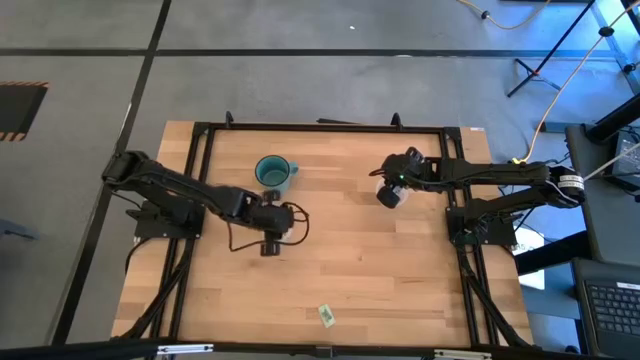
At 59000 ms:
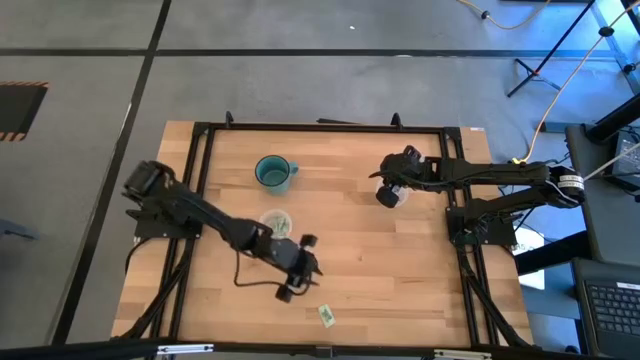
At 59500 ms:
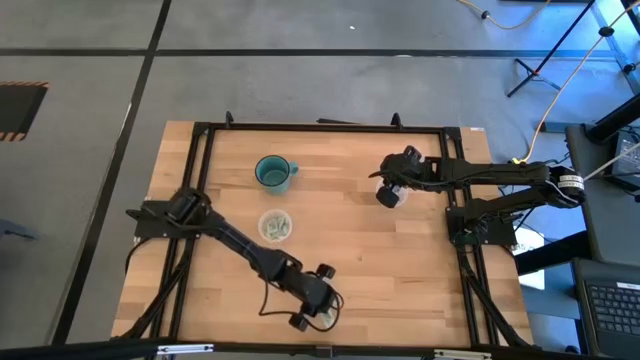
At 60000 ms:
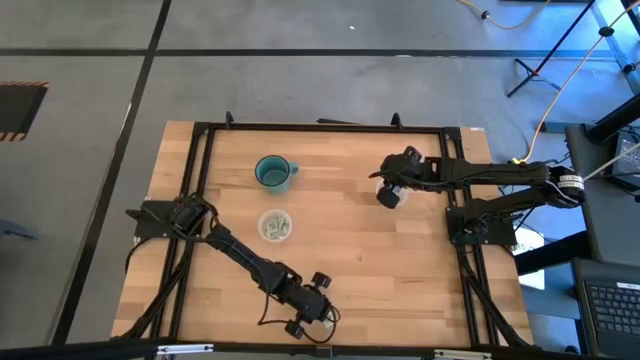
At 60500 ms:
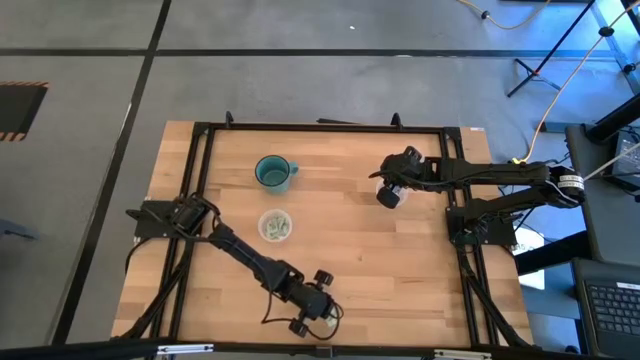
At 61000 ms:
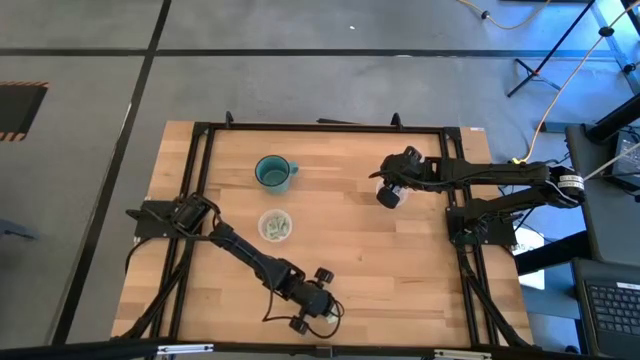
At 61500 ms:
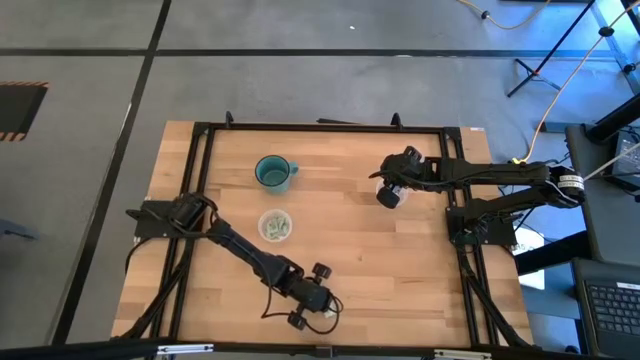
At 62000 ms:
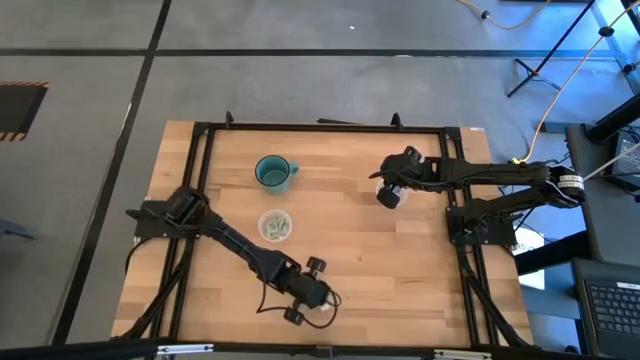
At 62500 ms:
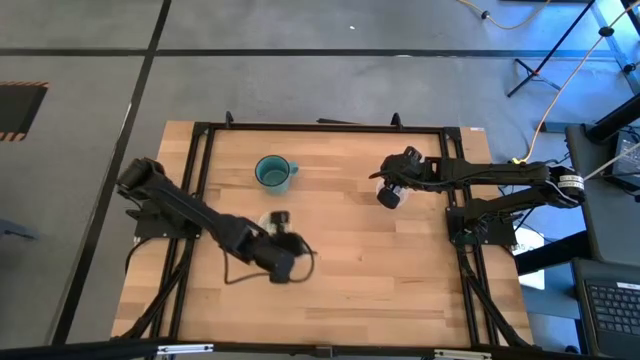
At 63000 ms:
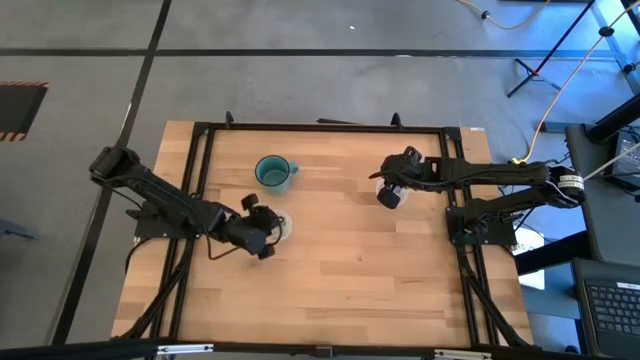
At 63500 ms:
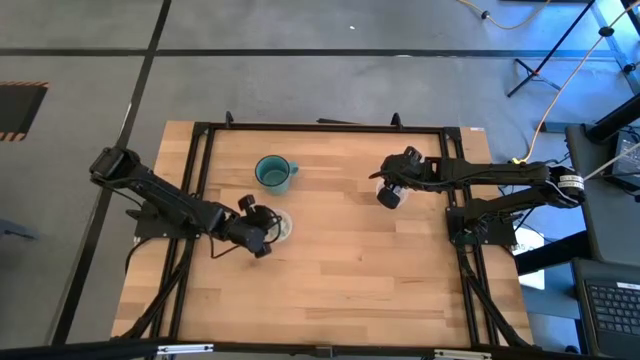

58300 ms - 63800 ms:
Task: Pick and place Stevia / Truvia into bins
Put the white stevia packet into the left transparent container

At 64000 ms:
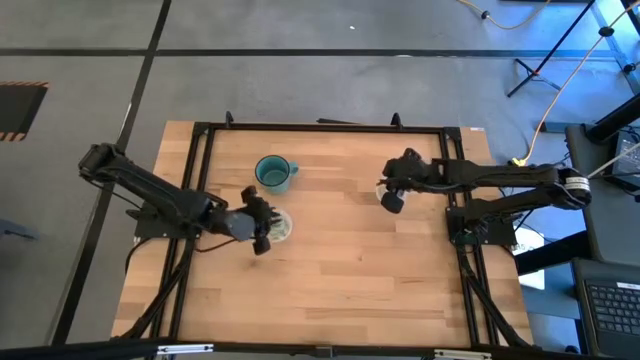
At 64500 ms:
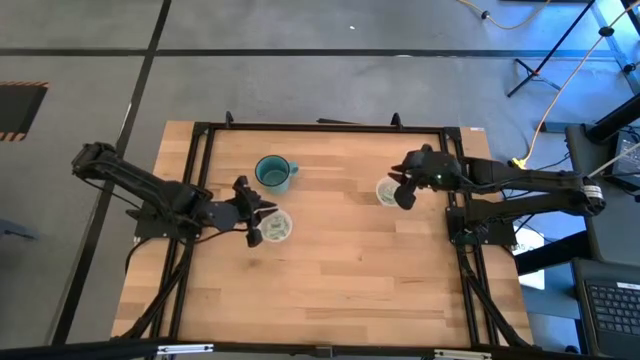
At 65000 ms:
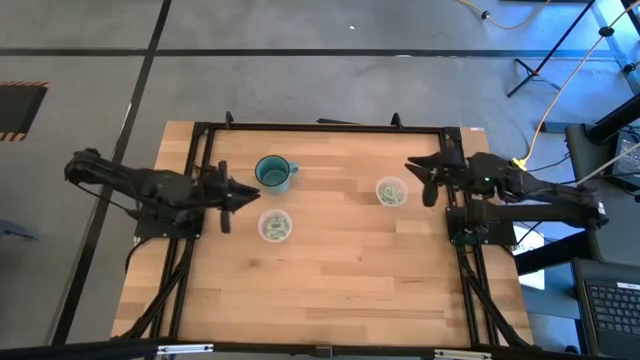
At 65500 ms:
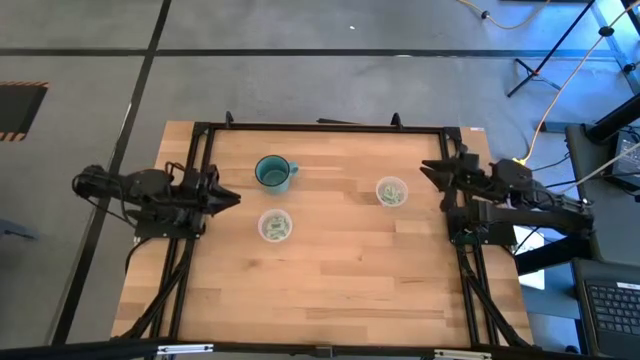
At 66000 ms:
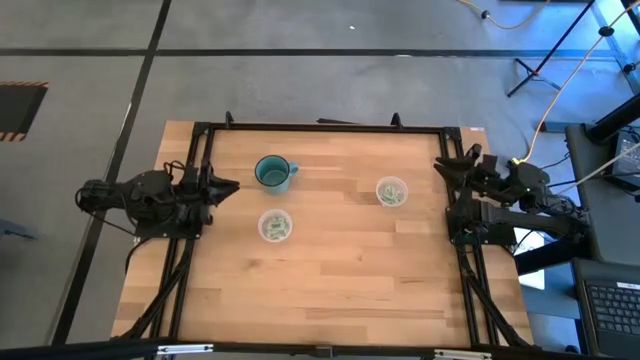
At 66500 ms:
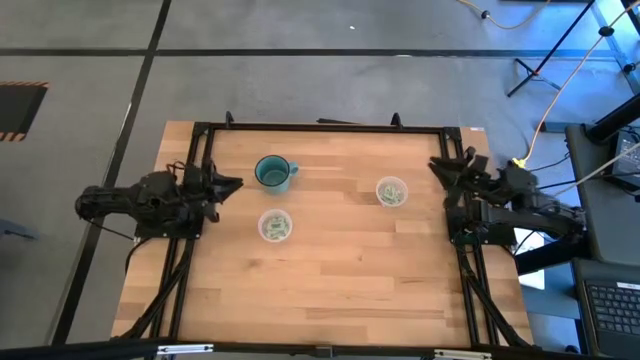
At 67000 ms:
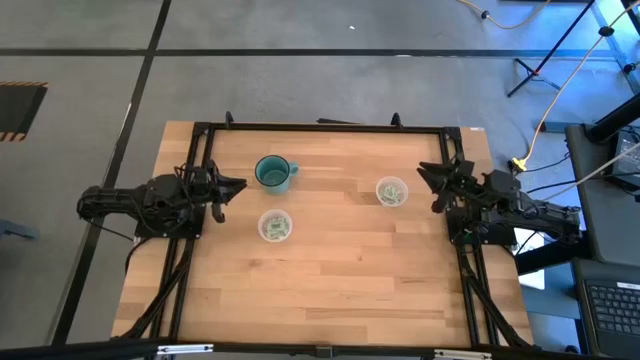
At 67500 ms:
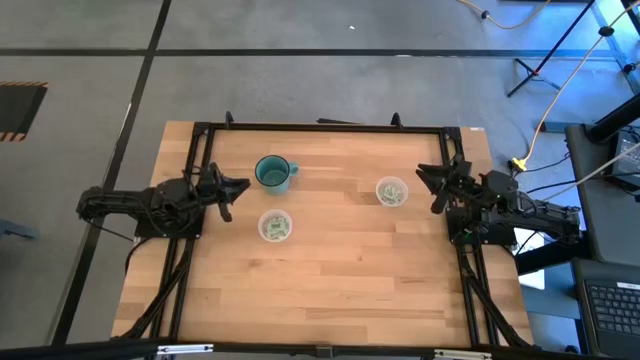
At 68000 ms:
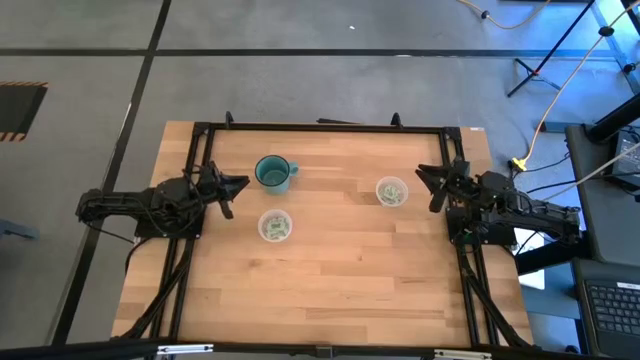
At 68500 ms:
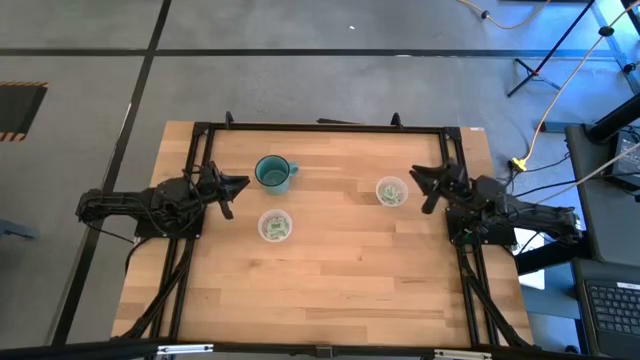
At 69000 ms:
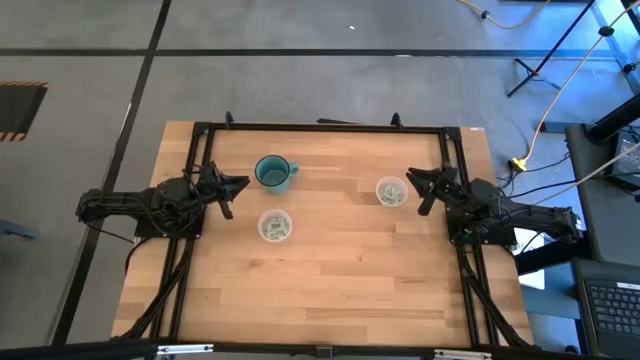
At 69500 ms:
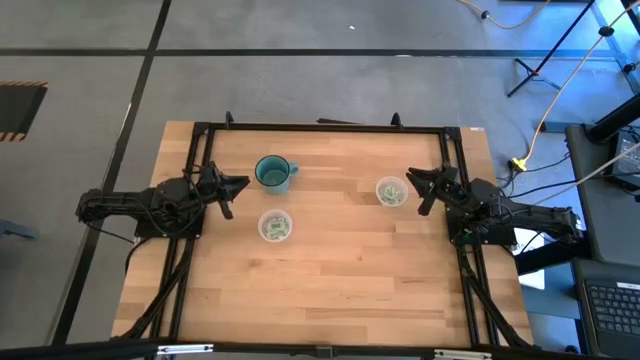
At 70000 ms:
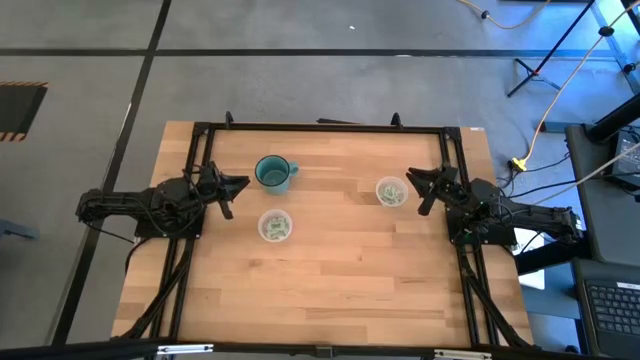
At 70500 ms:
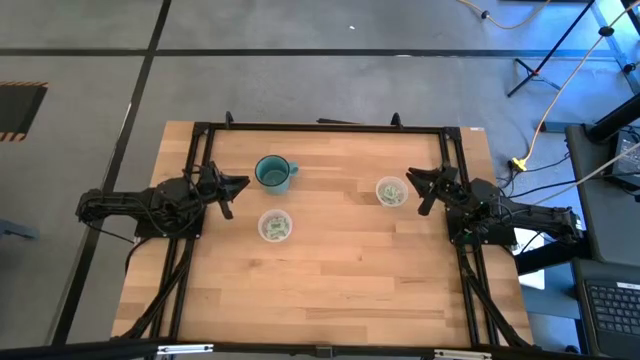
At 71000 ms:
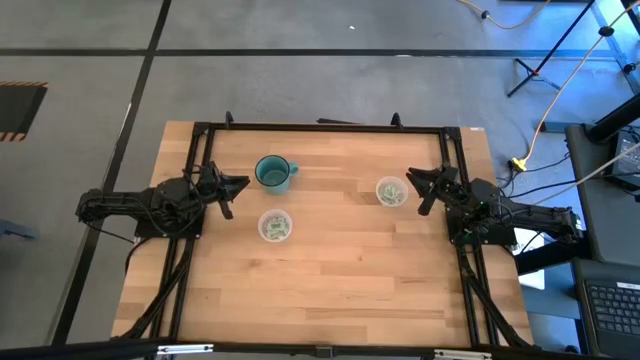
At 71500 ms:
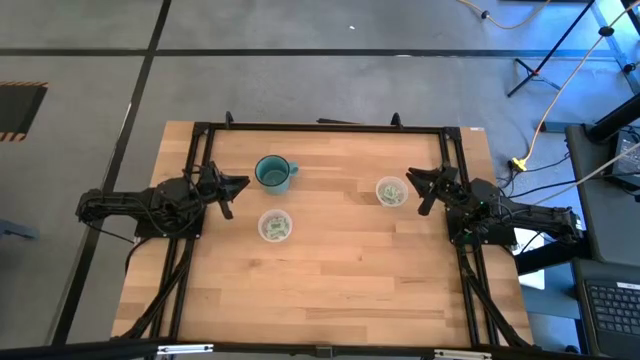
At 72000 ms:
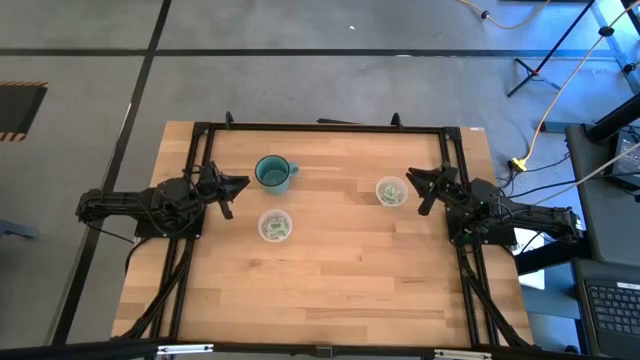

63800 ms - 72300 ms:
Return to Home Position

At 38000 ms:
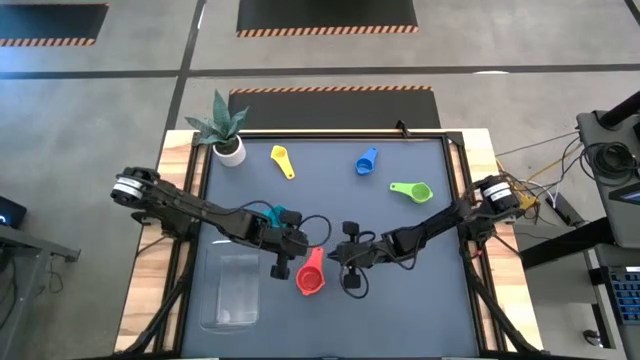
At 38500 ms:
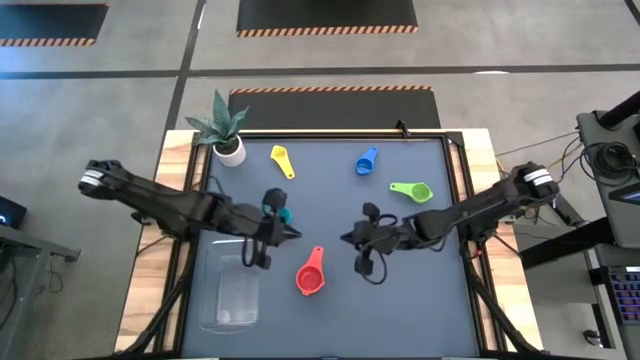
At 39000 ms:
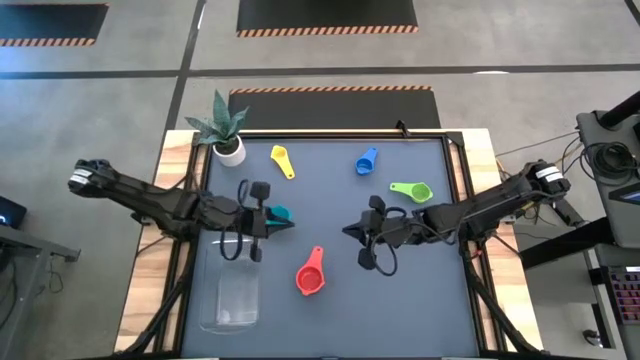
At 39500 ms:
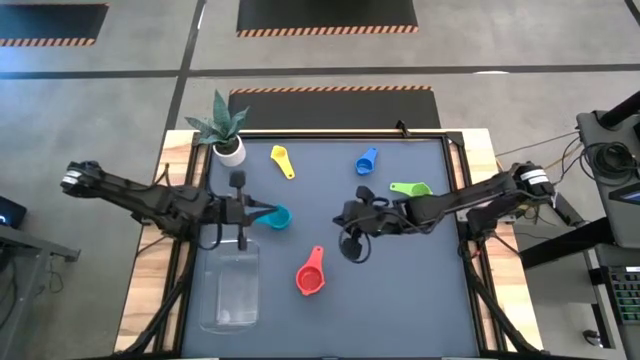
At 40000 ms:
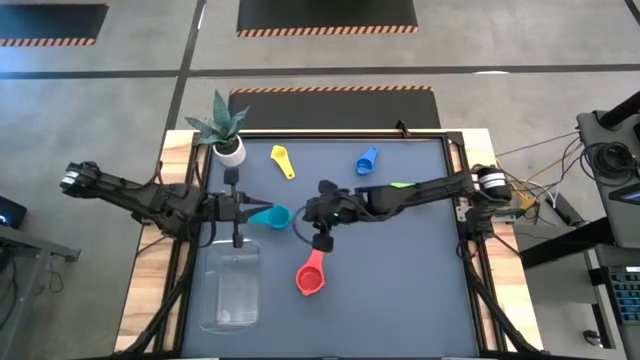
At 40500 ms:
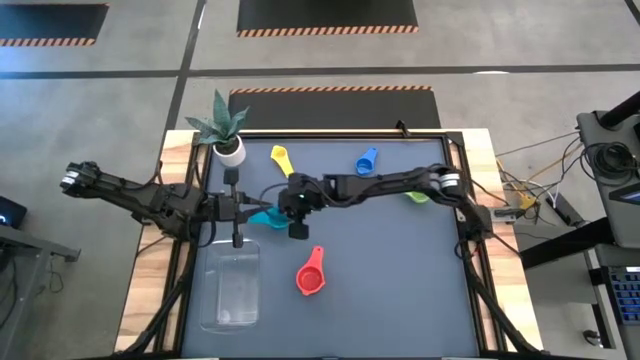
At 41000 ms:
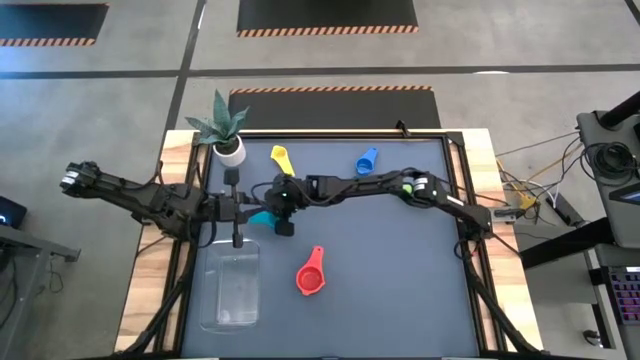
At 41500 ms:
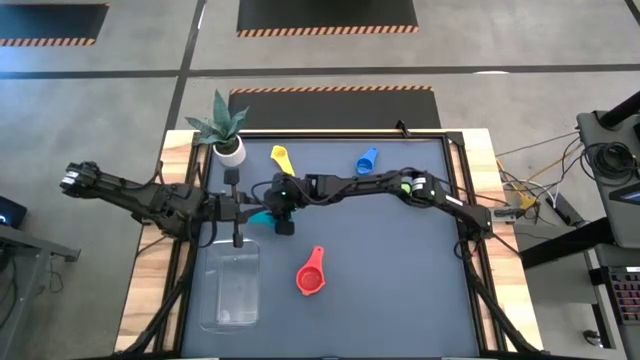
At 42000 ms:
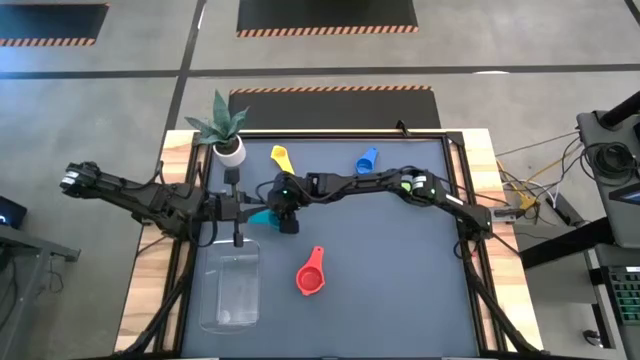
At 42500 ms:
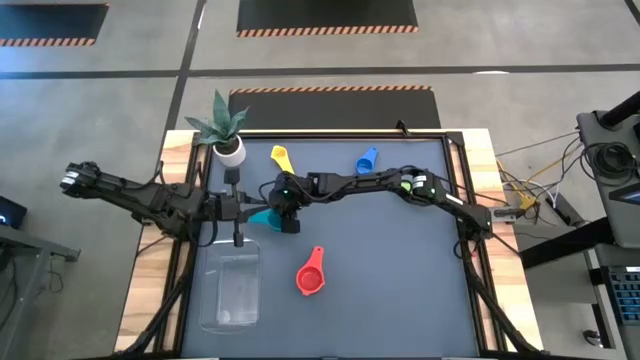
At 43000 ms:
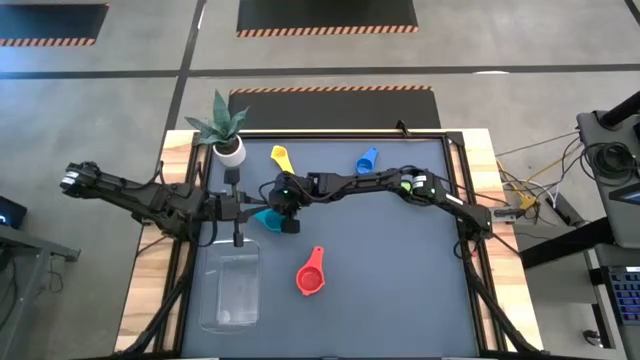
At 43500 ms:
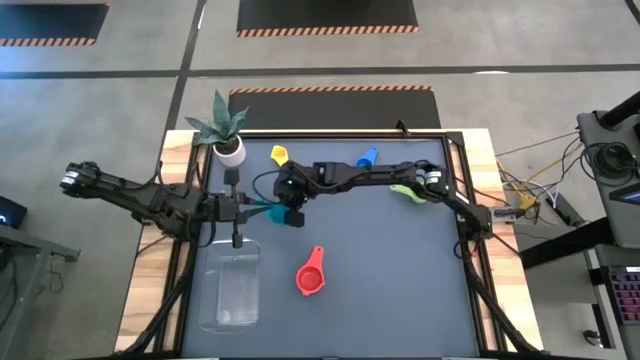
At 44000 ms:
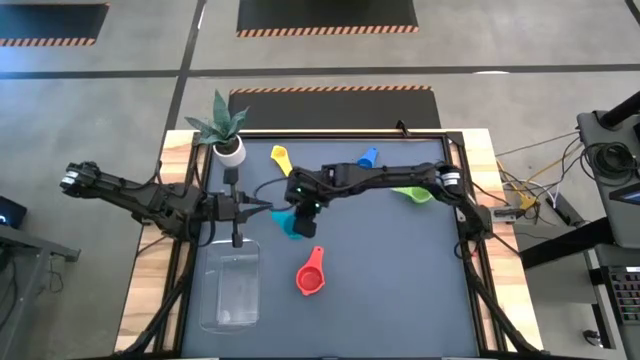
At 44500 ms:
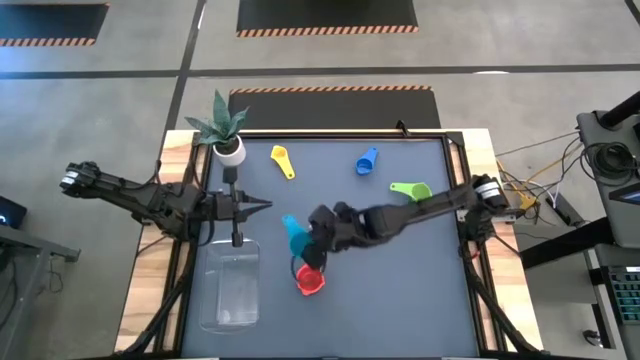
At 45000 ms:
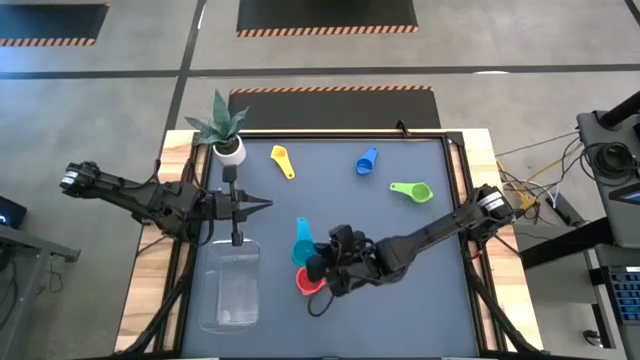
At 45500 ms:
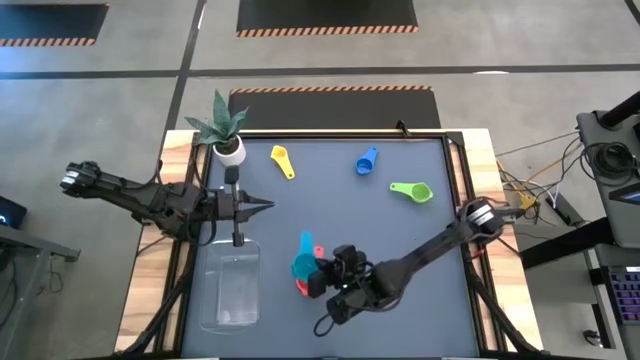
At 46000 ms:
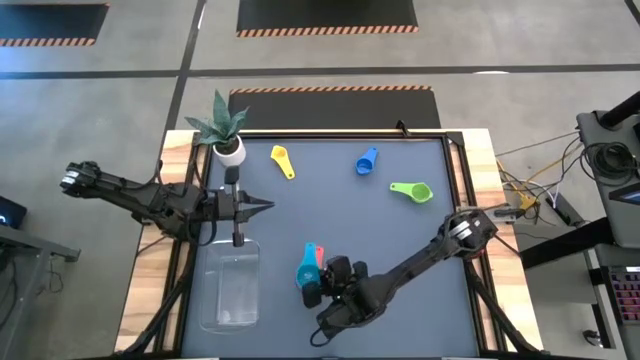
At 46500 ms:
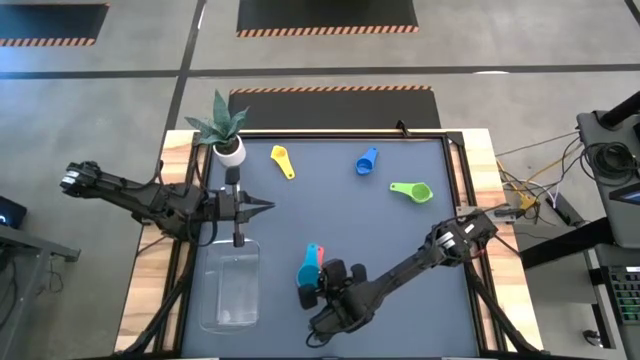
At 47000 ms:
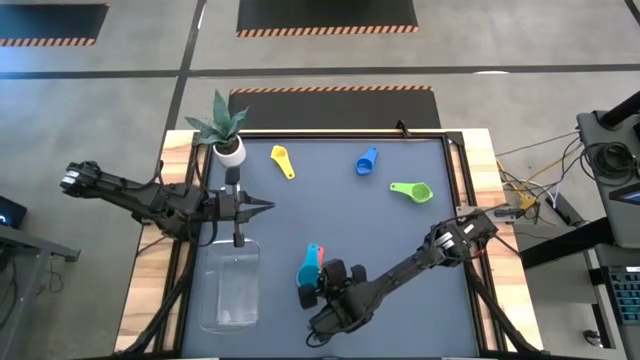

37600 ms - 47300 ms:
Task: Nest measuring cups in basket
Stack the light blue measuring cup on top of the red measuring cup
